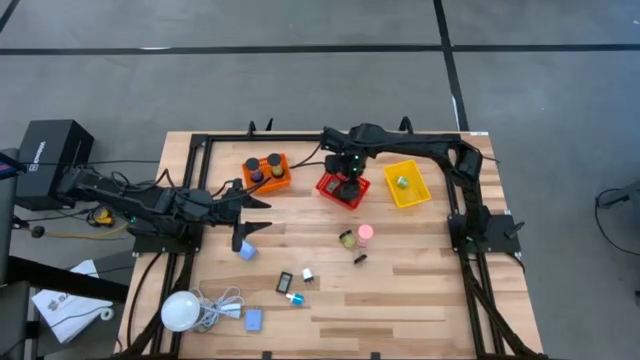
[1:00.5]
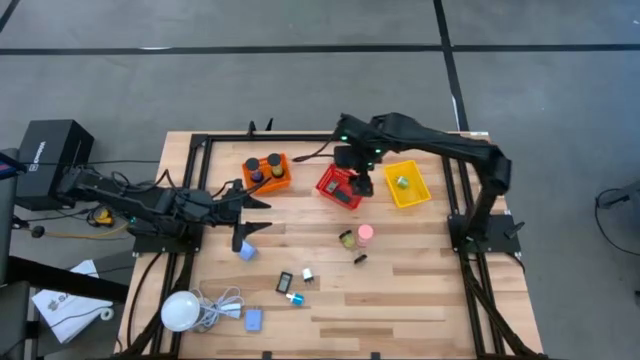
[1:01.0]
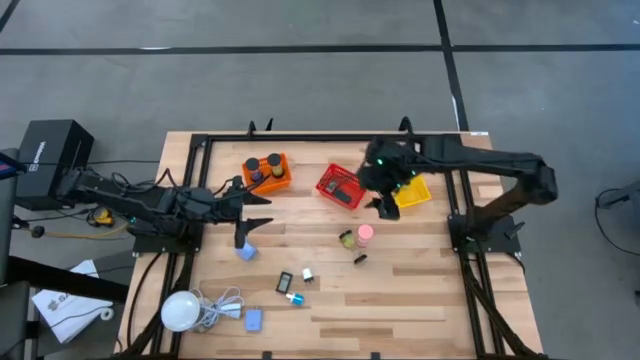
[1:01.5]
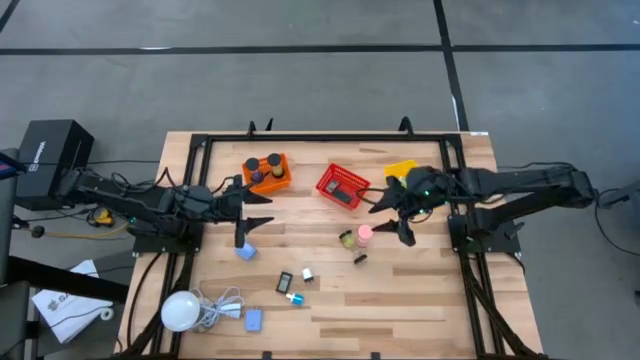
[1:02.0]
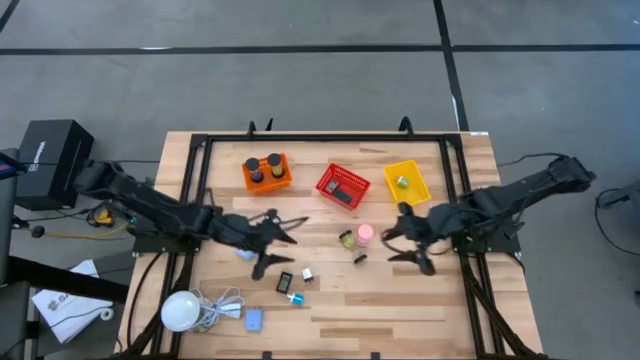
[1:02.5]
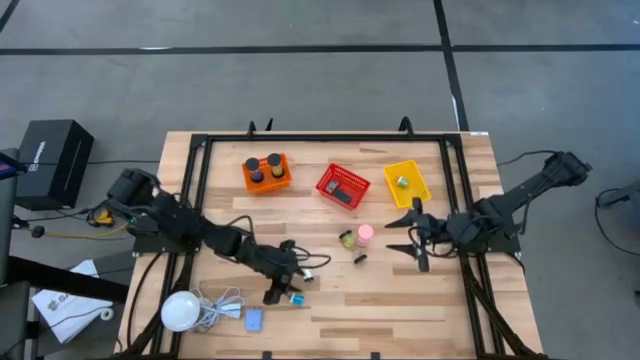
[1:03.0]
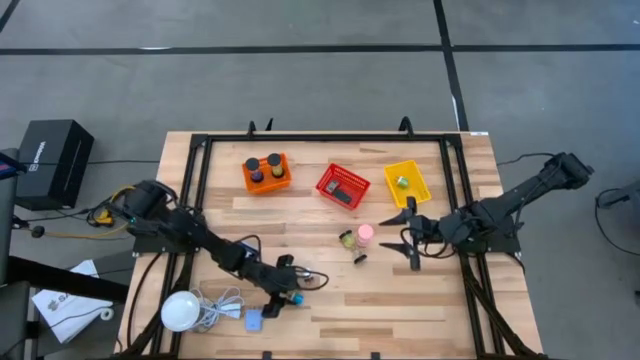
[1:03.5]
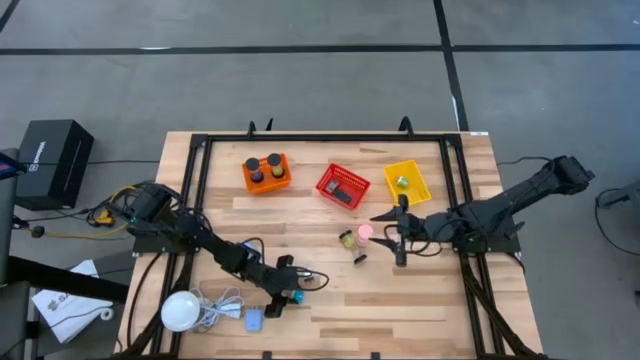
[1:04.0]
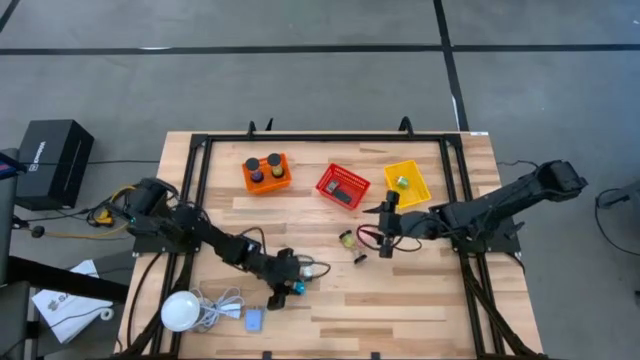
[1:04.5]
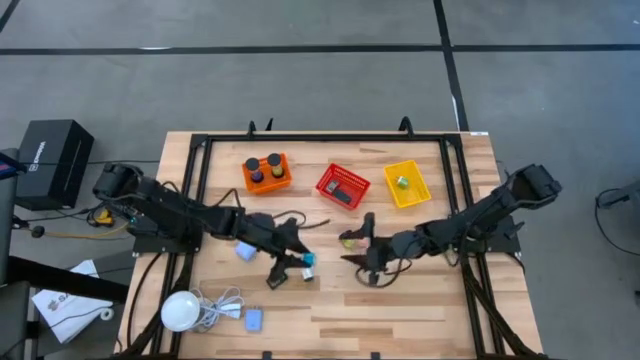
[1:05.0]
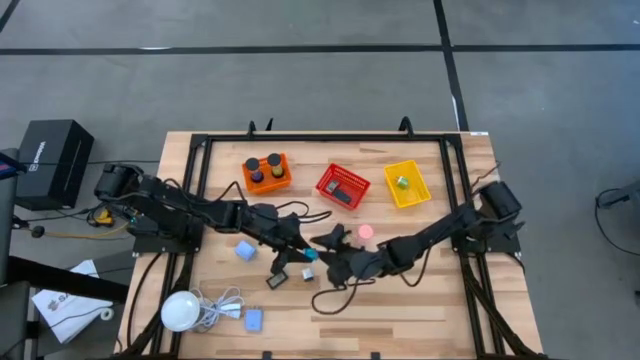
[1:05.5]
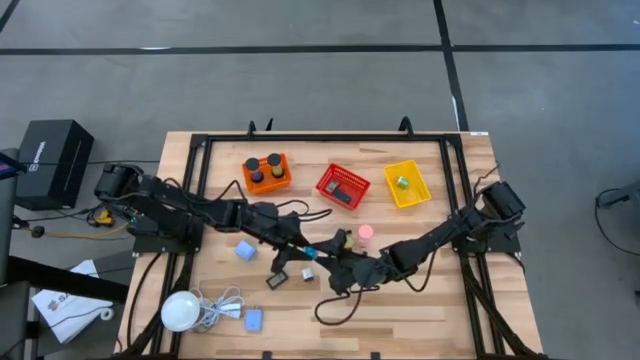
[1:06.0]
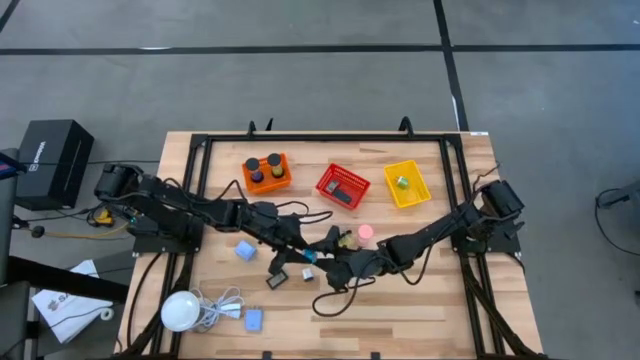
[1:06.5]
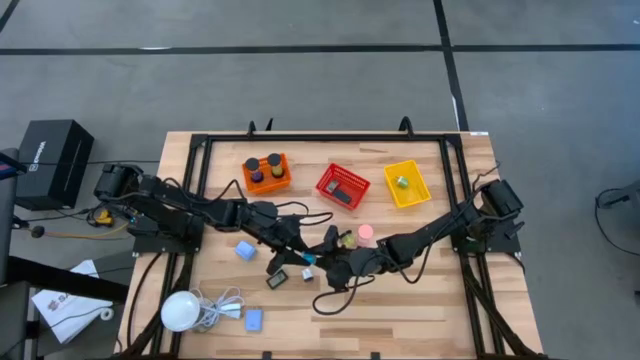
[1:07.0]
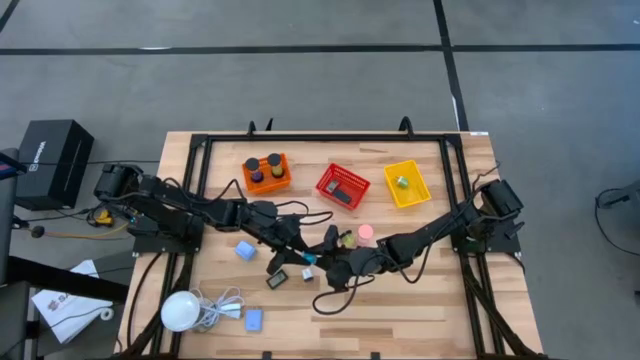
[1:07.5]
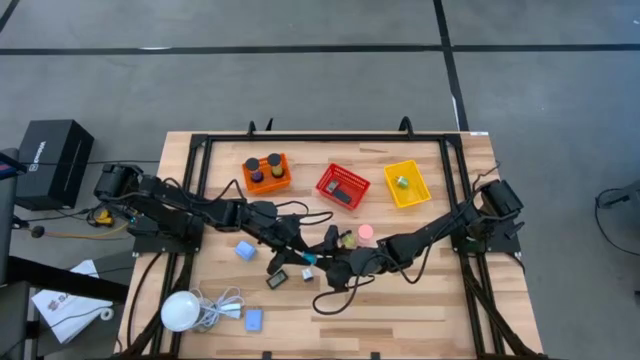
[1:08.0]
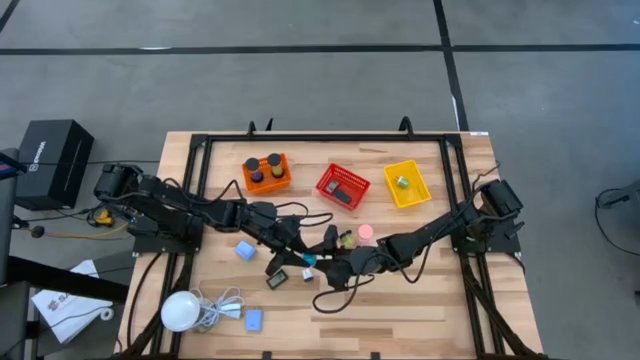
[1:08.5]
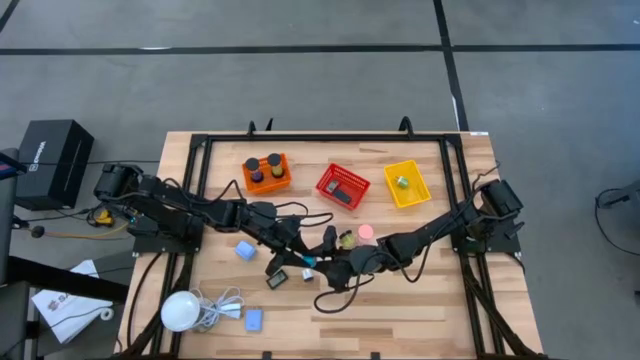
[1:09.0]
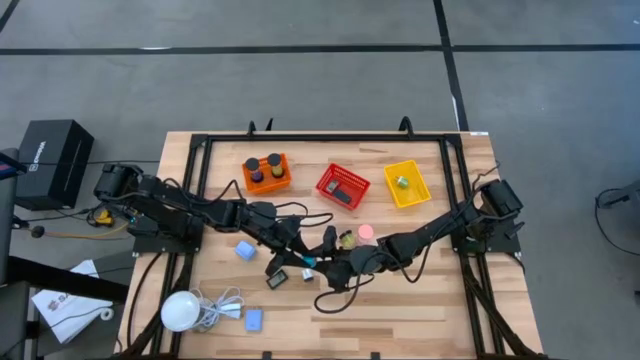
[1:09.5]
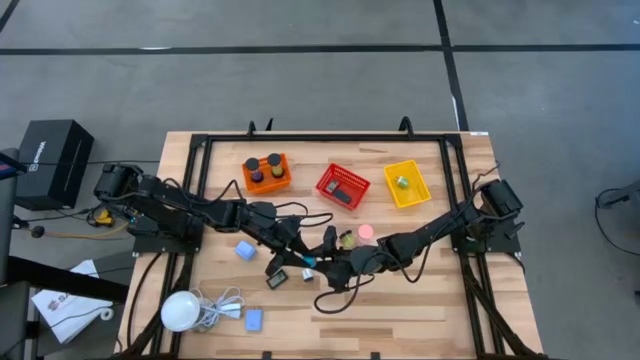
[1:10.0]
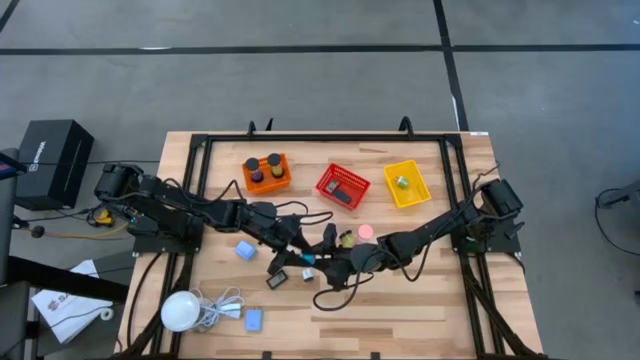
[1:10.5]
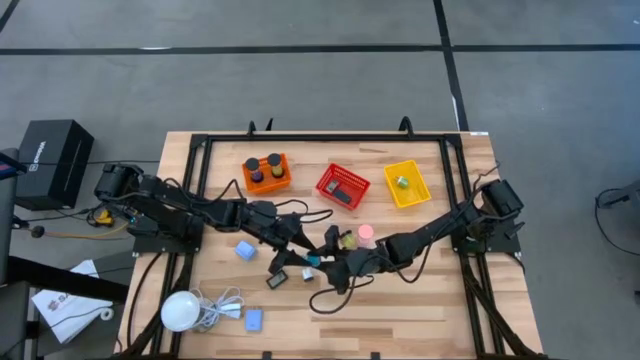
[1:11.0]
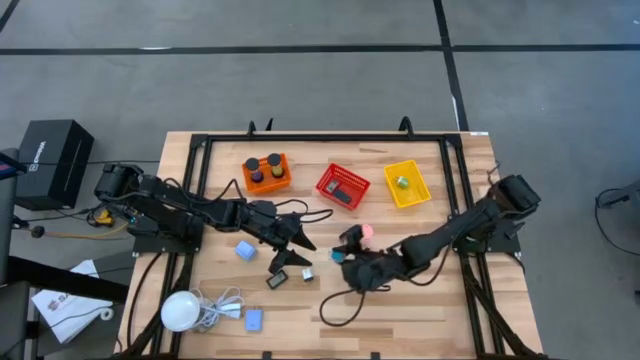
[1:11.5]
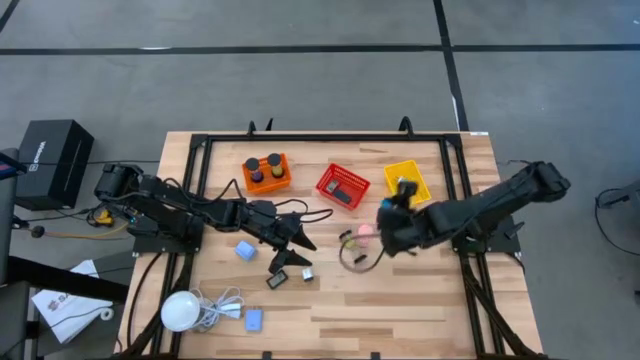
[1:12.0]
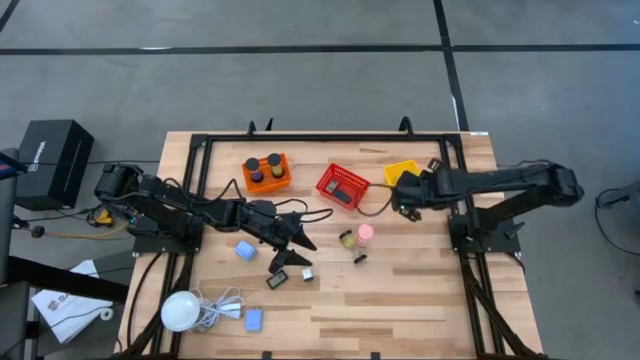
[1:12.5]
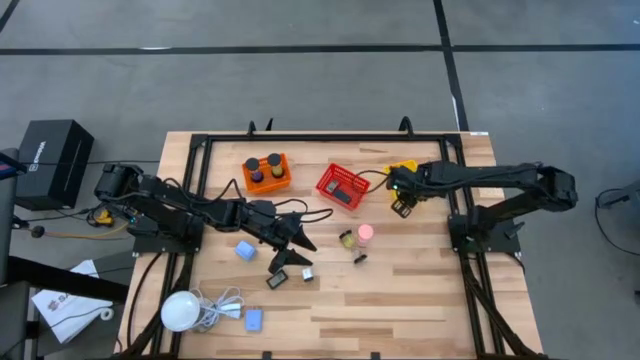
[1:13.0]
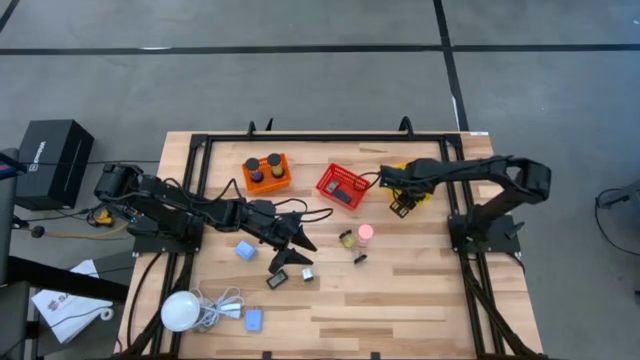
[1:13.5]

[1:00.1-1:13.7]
Task: Pick & Place Office items
Put the blue charger adapter into the yellow bin

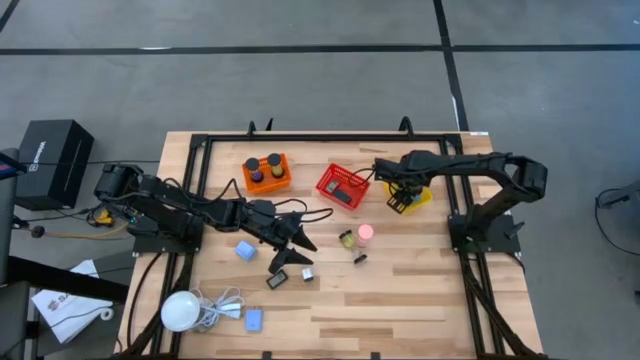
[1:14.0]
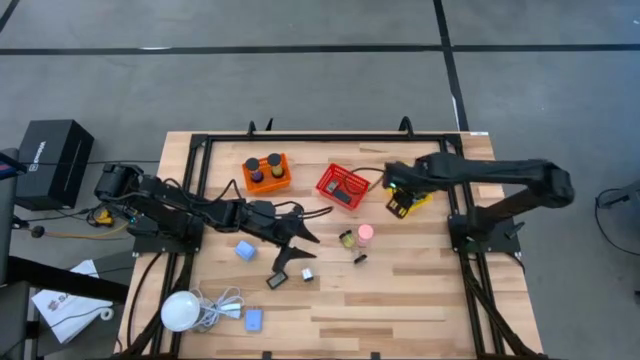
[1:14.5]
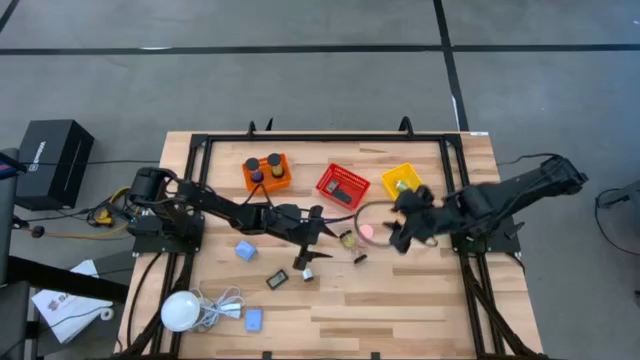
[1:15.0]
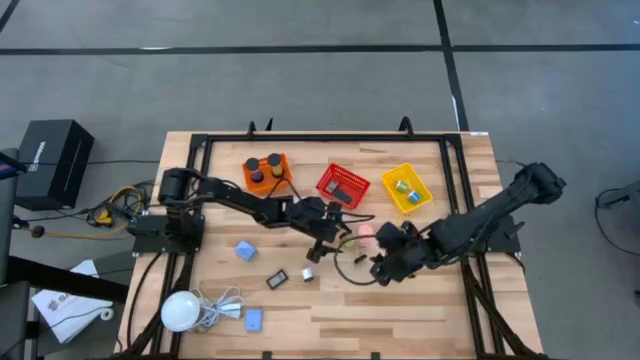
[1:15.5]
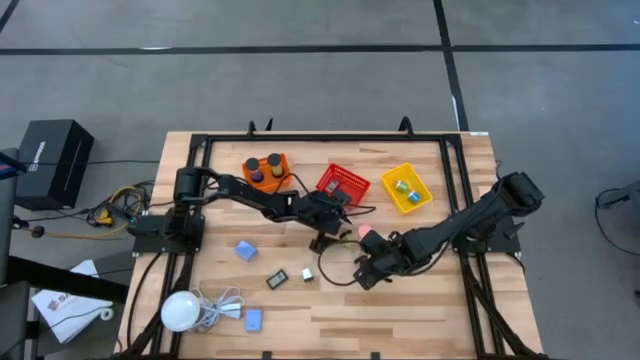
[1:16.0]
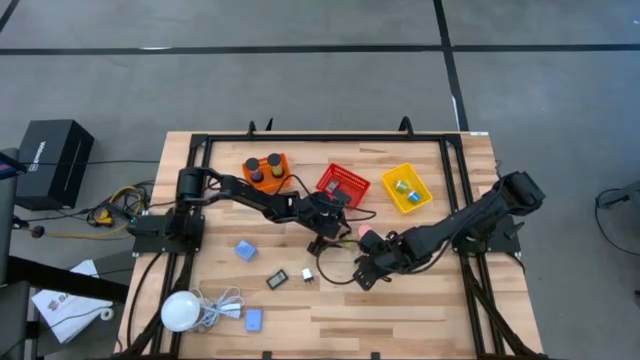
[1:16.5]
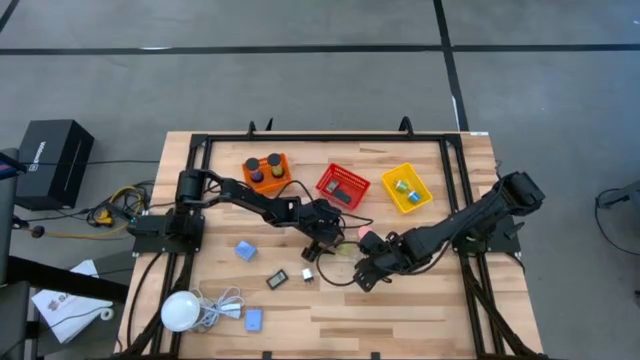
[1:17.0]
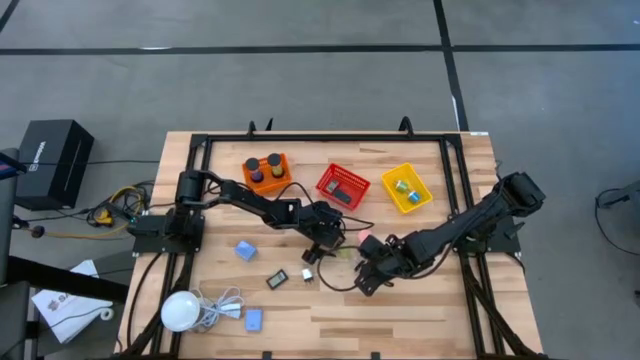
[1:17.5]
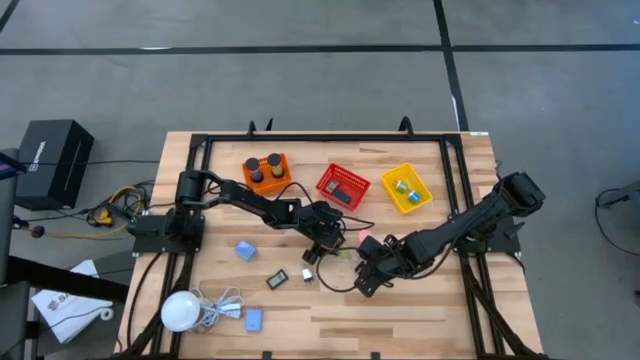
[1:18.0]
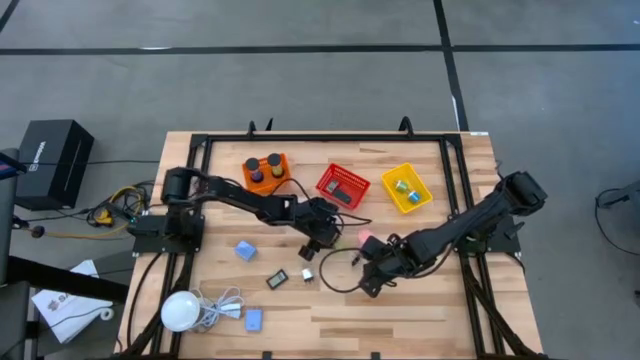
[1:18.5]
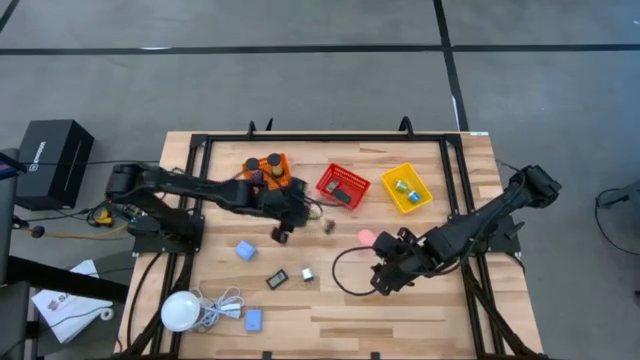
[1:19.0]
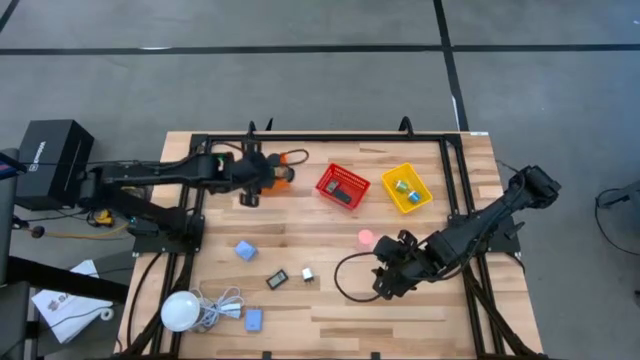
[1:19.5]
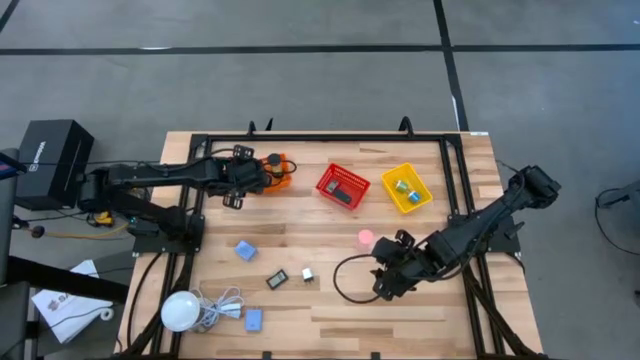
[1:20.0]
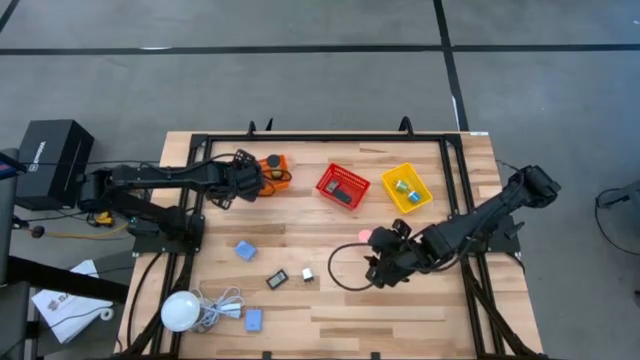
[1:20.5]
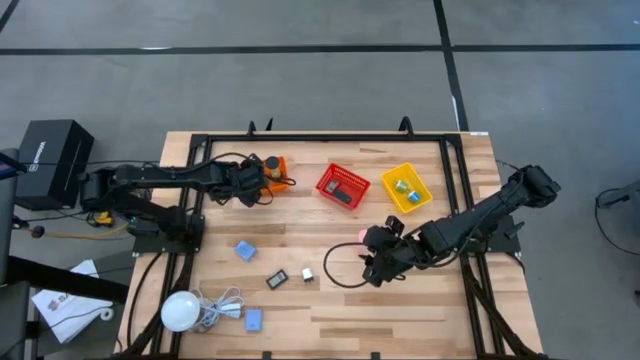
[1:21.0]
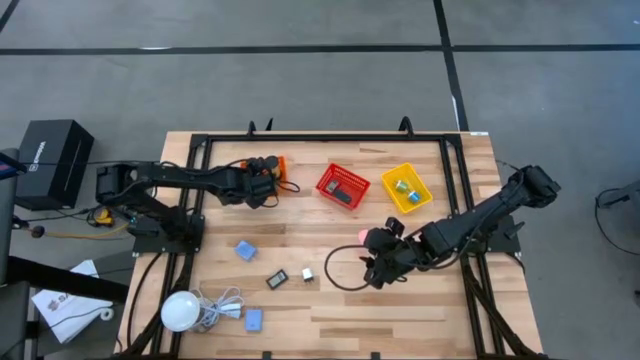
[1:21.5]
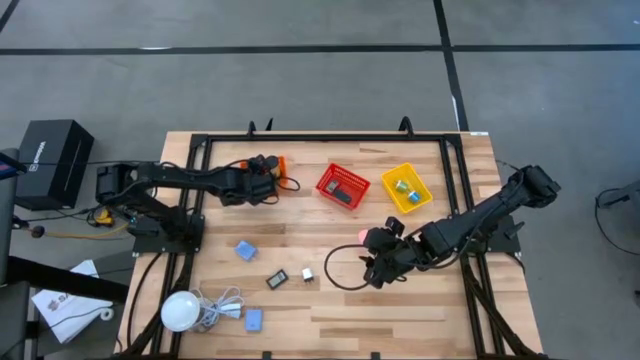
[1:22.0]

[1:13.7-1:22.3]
Put the green hourglass into the orange bin
